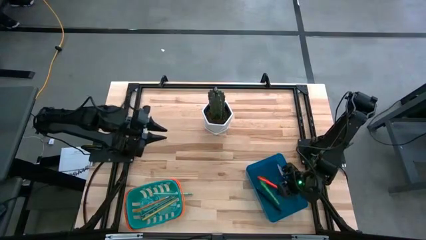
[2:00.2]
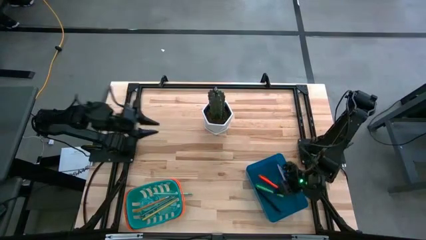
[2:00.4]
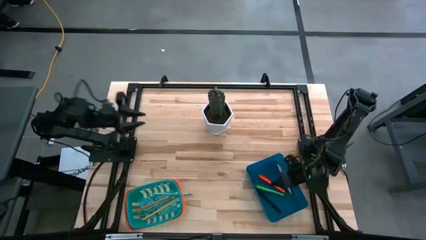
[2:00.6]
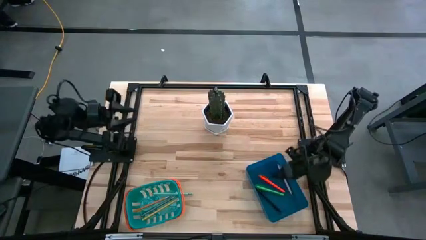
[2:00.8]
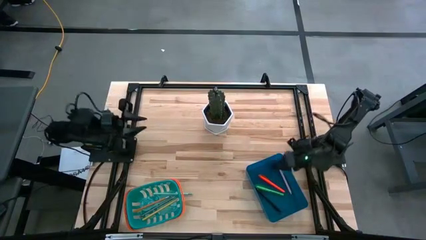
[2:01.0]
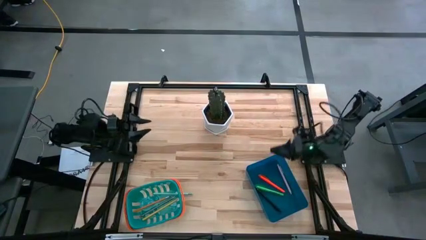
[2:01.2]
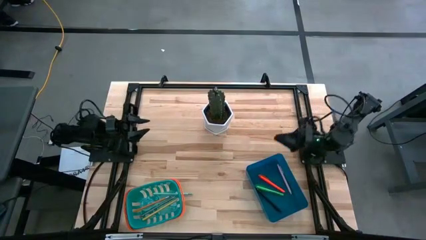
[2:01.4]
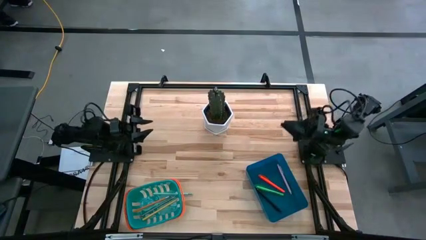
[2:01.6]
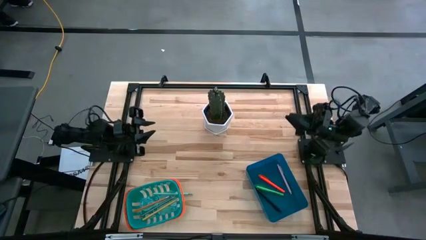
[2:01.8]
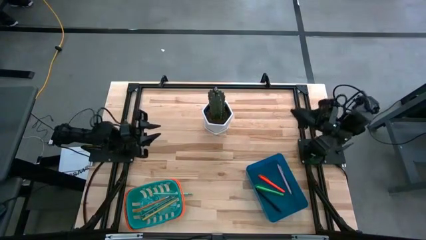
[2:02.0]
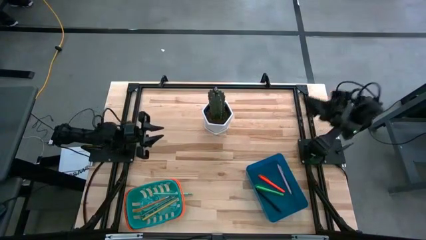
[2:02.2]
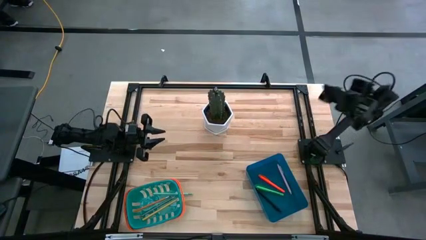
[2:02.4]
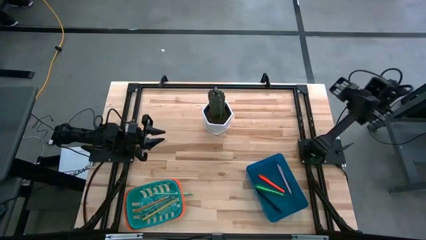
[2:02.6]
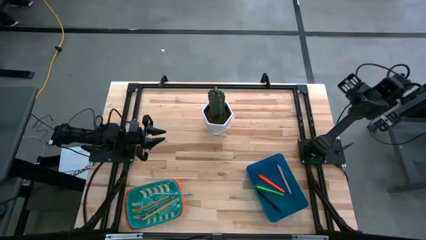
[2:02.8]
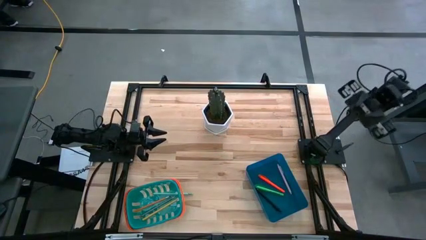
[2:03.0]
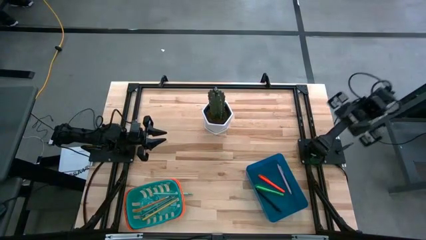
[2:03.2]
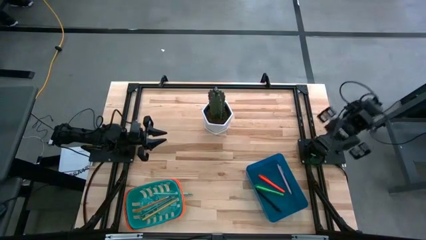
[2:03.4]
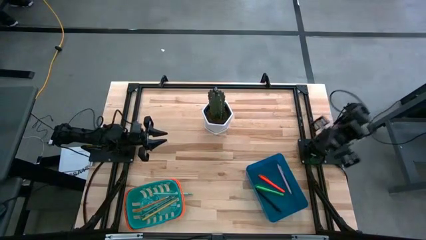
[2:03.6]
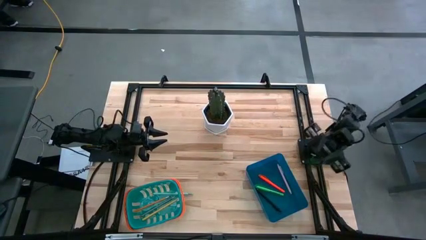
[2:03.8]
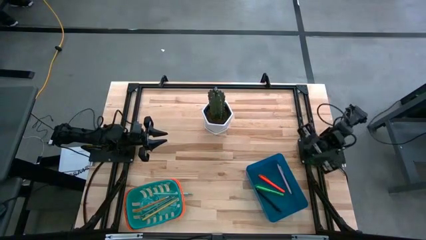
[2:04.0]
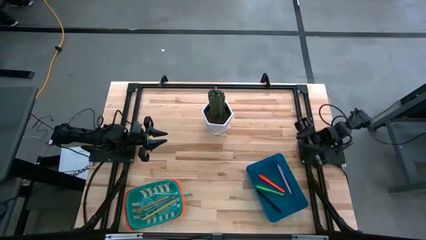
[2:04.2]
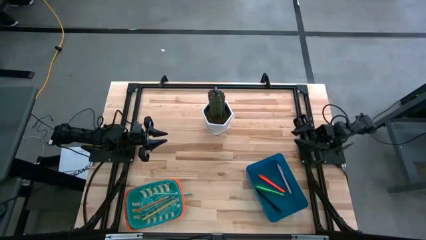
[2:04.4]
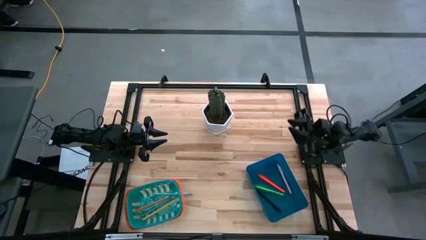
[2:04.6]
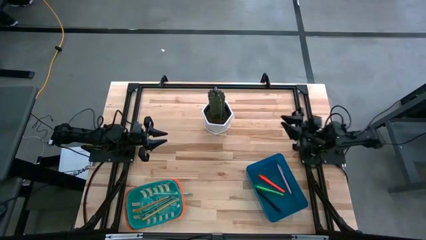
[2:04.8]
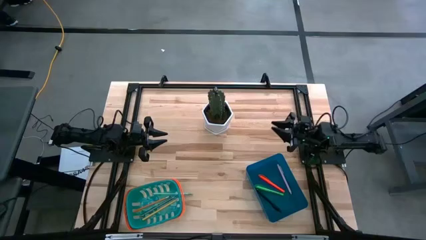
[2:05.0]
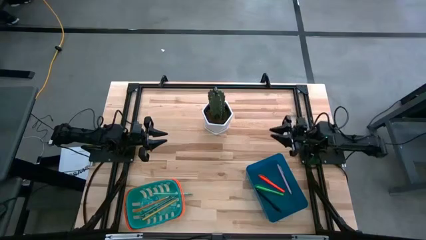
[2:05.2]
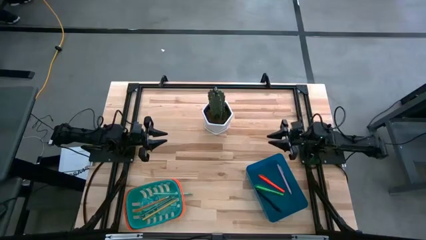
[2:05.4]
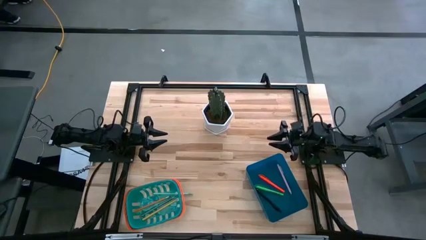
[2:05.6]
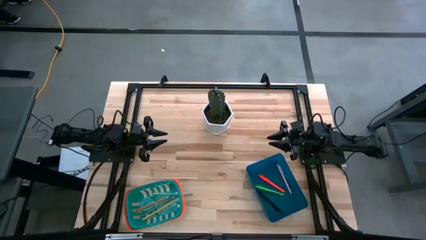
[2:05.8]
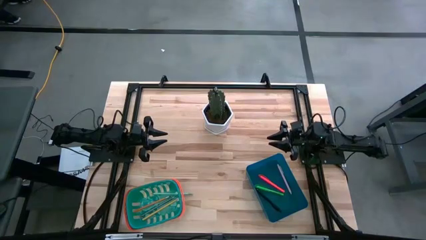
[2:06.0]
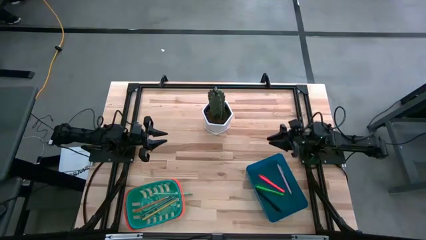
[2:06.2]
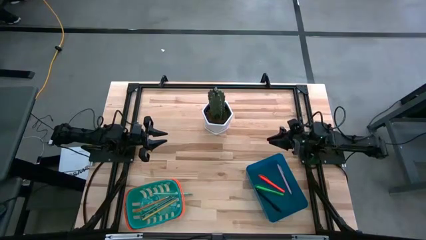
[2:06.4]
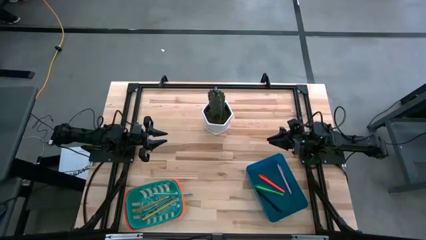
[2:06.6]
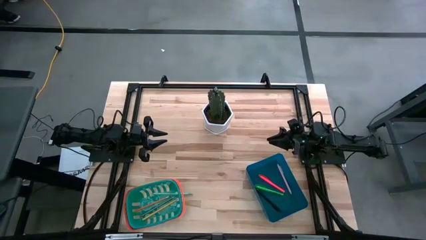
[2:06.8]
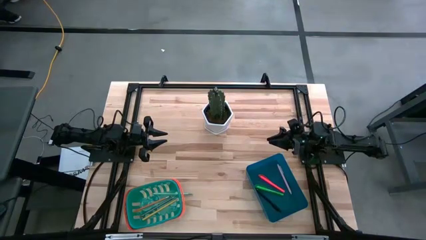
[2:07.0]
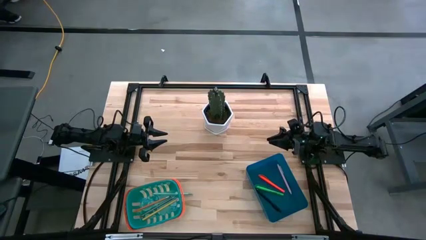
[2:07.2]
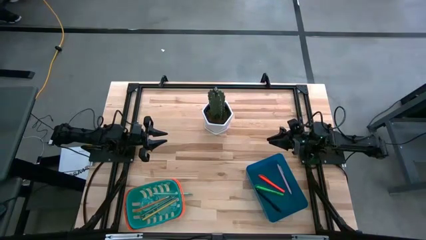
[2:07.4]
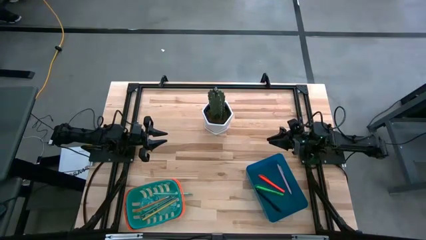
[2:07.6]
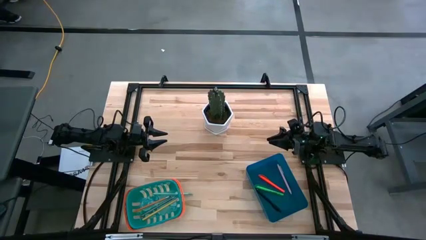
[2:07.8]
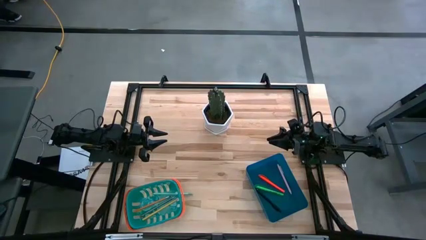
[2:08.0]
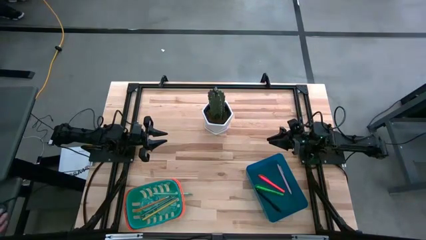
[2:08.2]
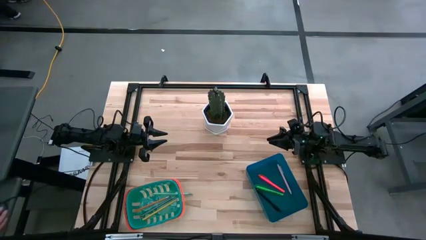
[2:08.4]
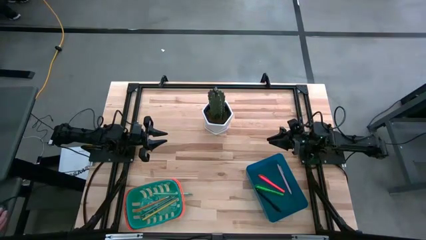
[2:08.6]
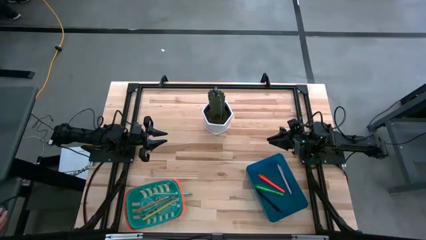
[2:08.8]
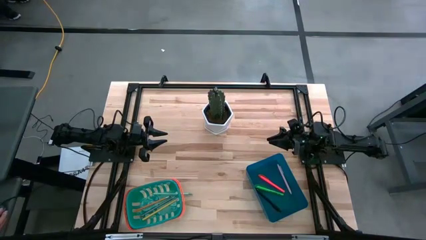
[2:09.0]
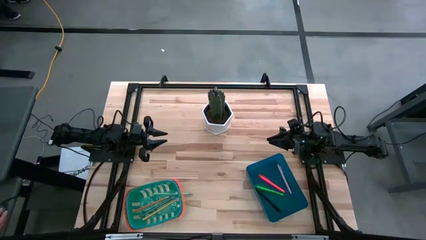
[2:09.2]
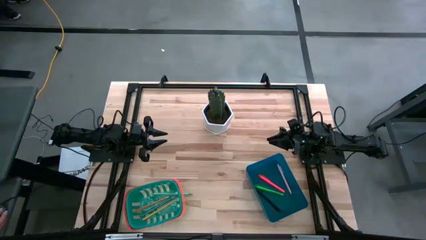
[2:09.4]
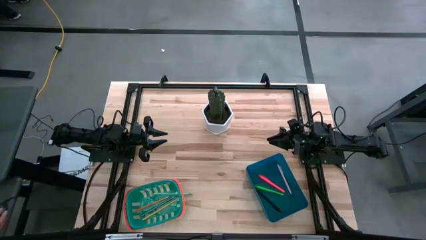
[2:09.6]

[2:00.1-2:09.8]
Task: Sort pens & pencils
Return to Home Position
